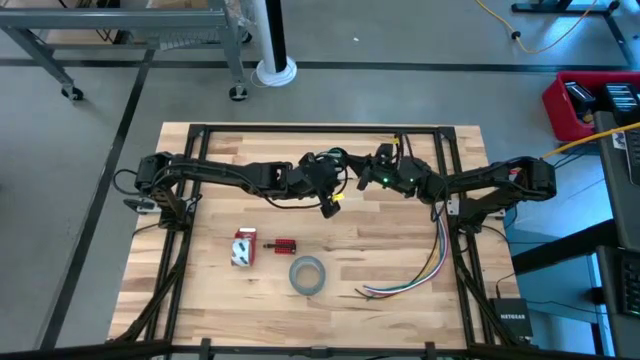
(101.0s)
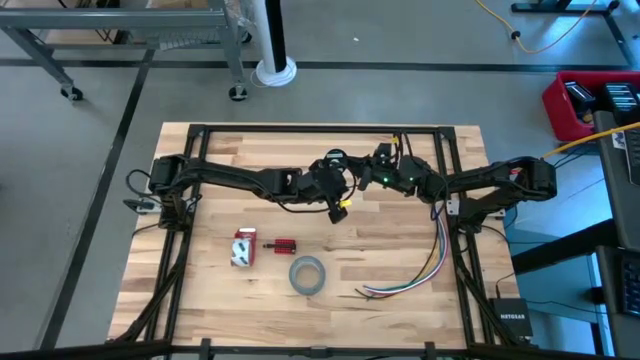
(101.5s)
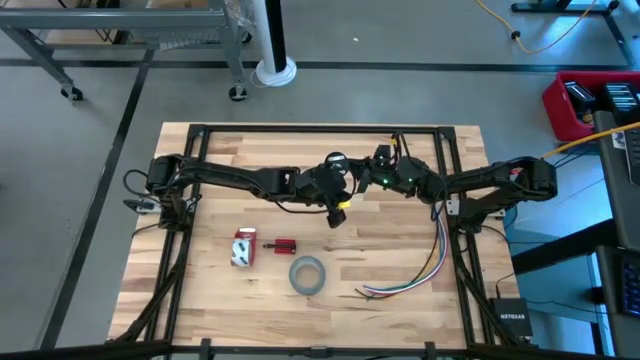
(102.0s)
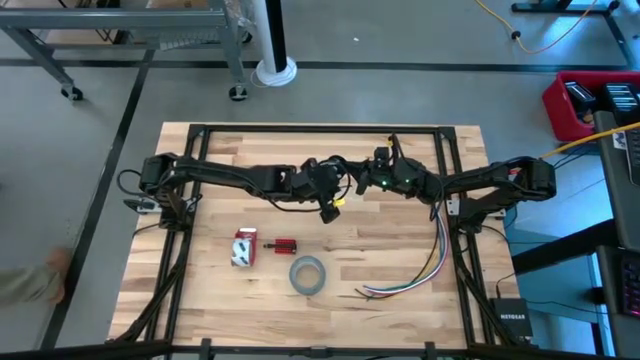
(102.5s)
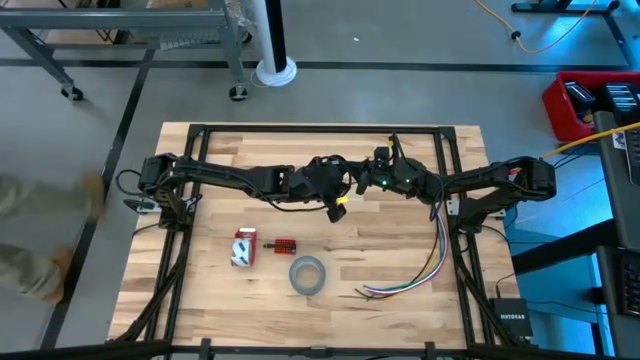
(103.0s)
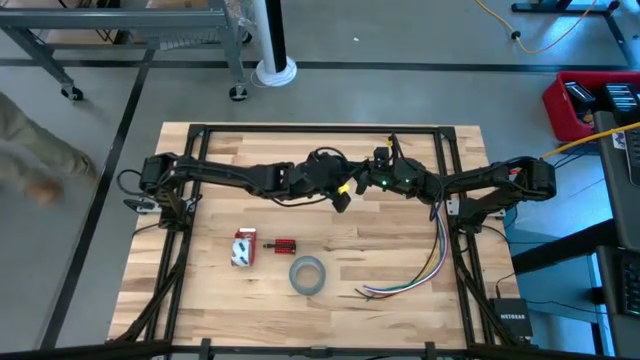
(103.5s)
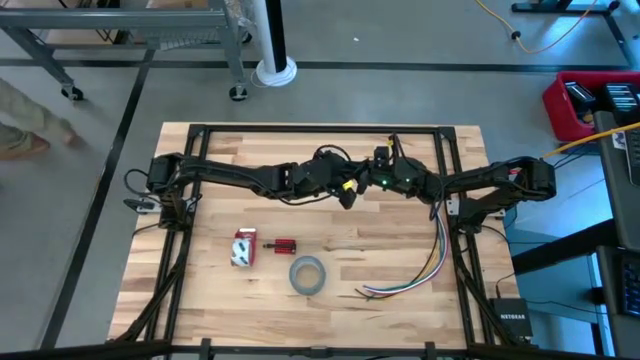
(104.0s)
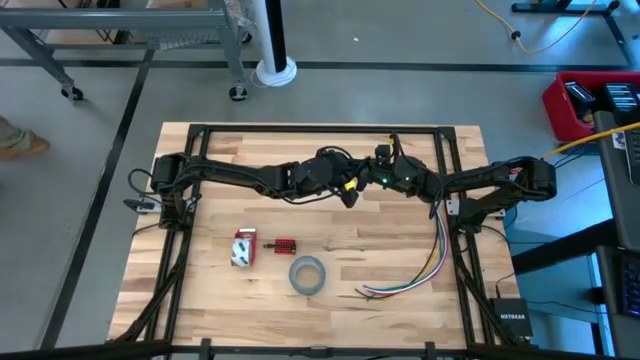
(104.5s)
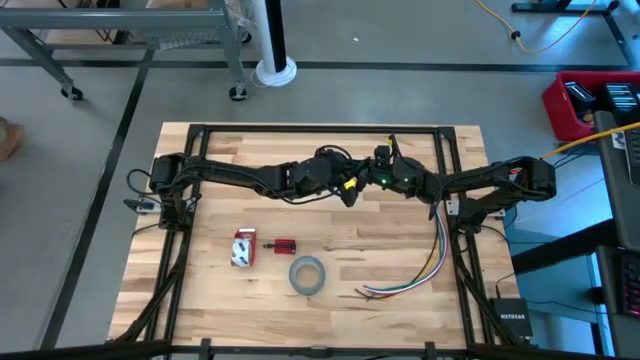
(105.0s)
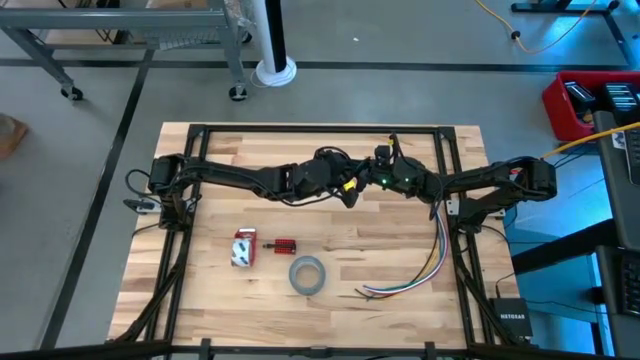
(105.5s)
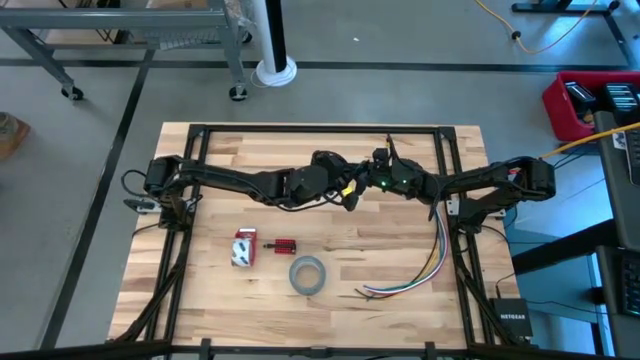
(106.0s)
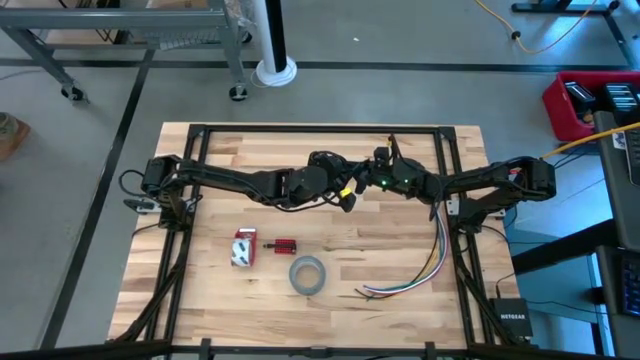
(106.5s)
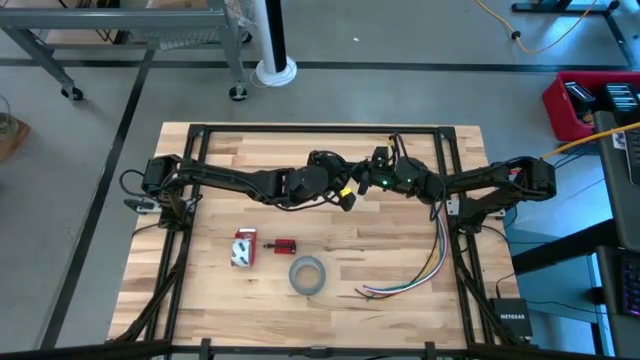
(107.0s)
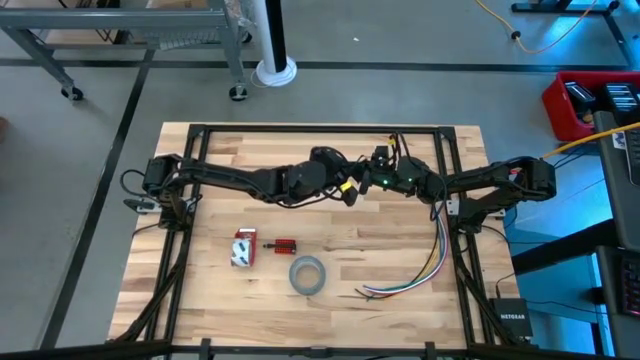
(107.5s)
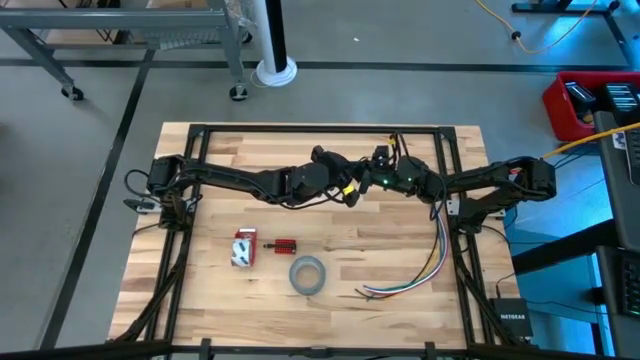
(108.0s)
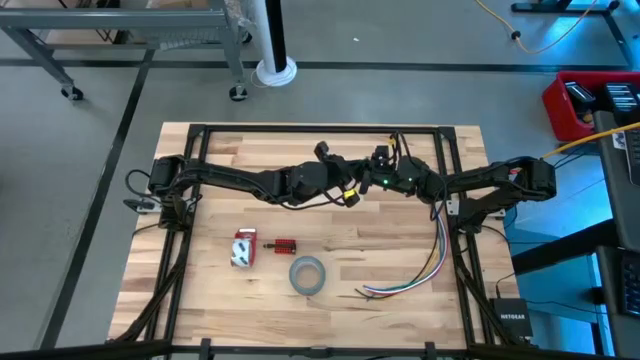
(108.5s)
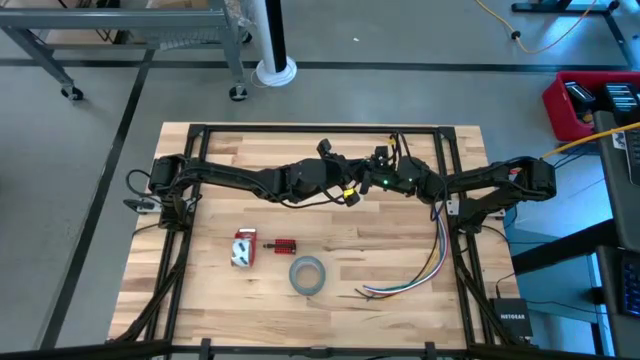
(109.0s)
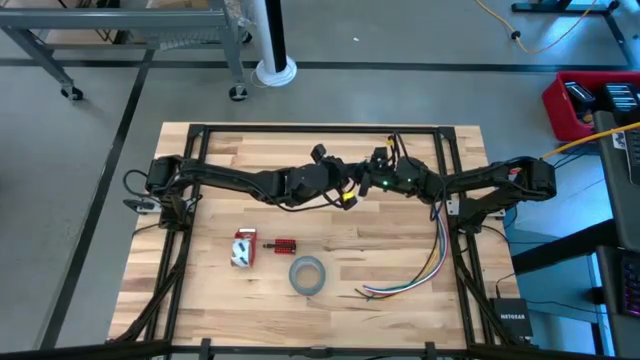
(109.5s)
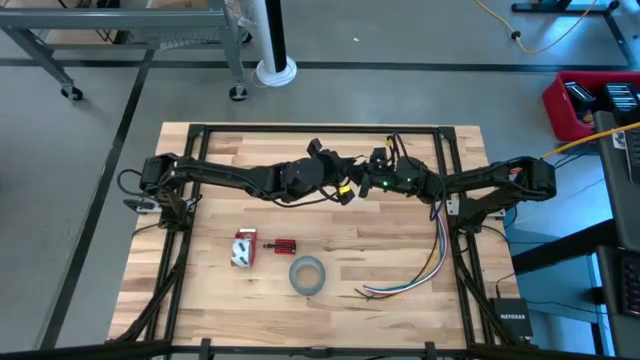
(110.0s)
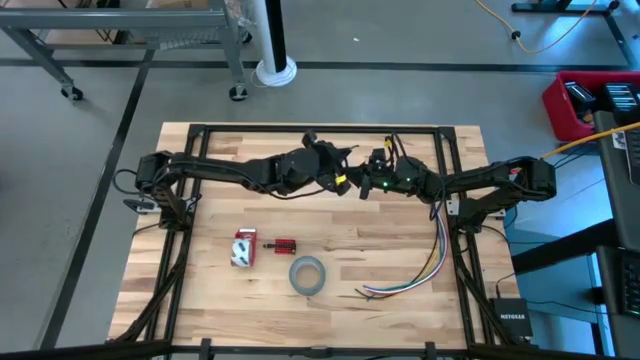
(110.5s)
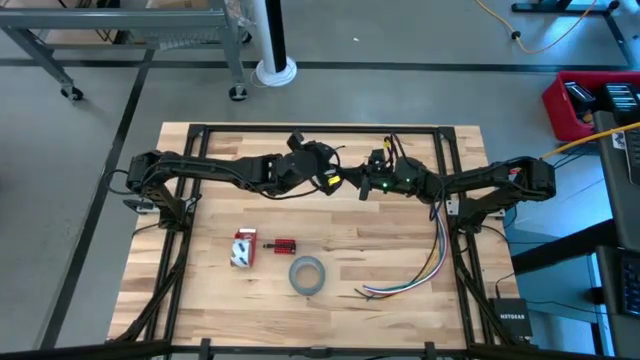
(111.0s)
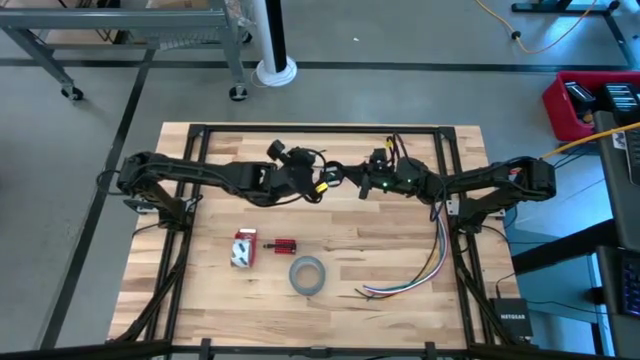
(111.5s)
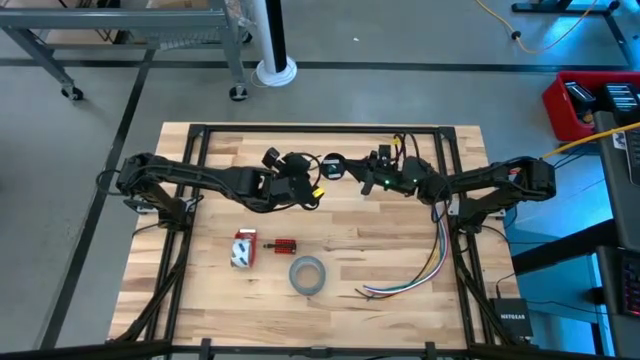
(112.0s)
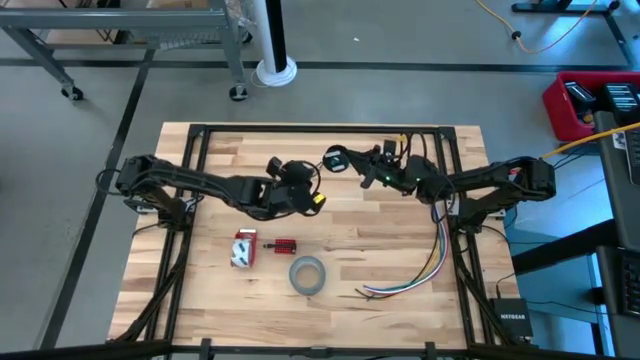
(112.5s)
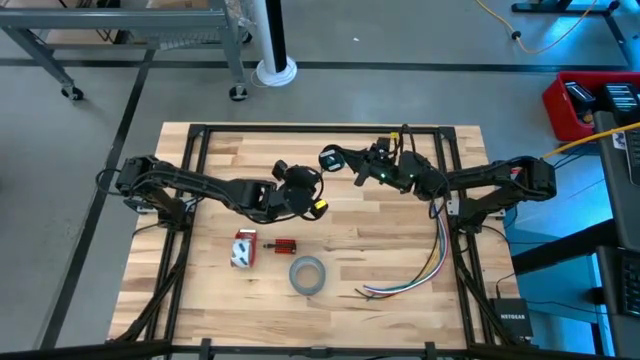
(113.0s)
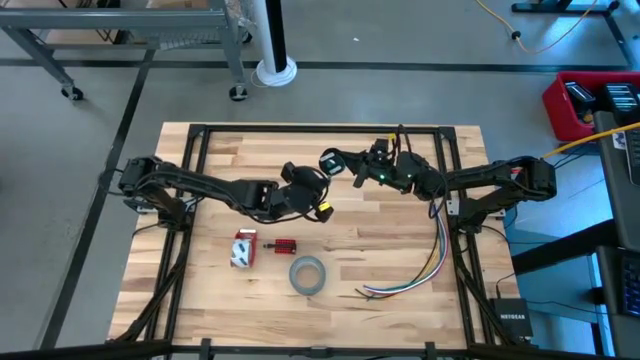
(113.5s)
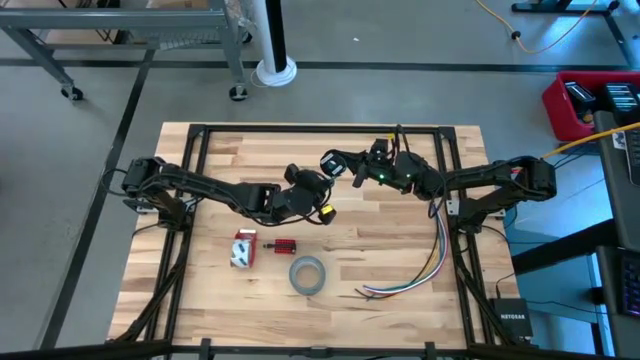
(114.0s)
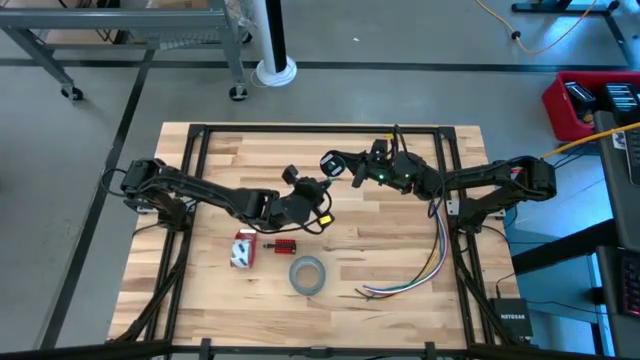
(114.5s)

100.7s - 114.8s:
Task: Coil cords
Coil the green wire onto the spool

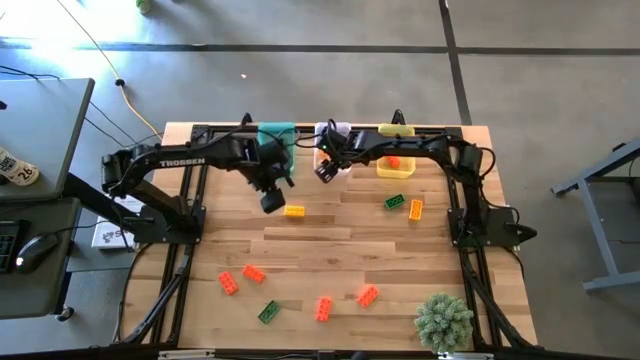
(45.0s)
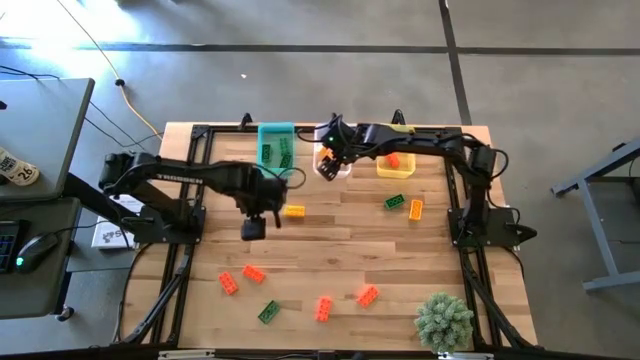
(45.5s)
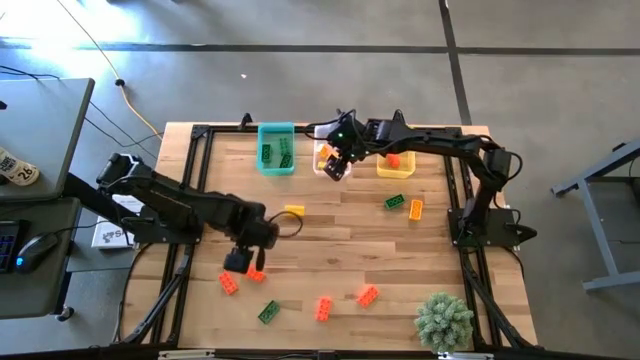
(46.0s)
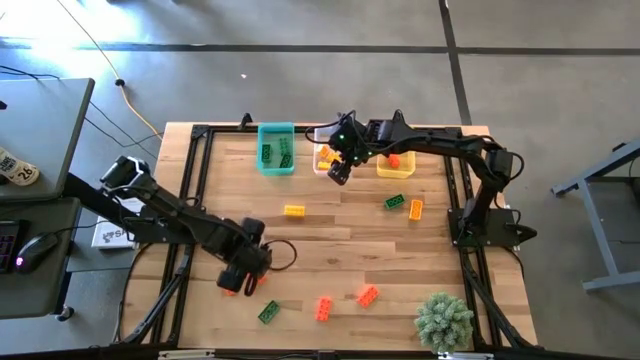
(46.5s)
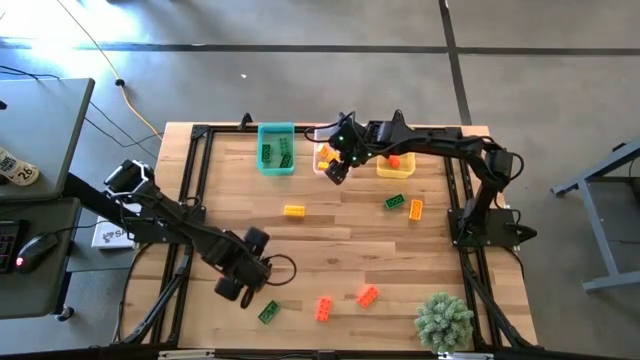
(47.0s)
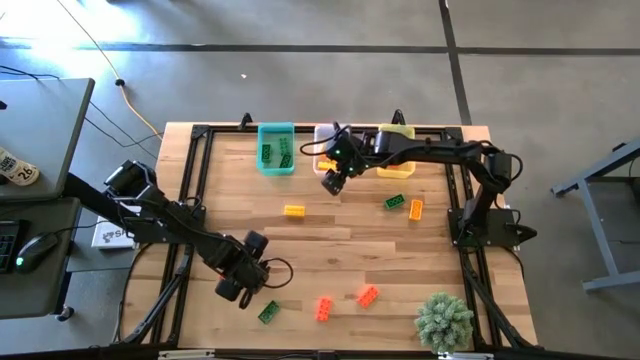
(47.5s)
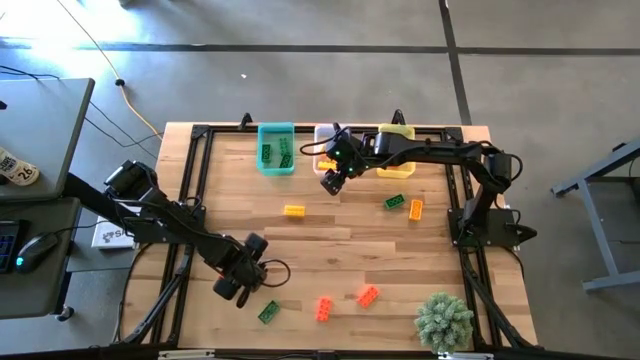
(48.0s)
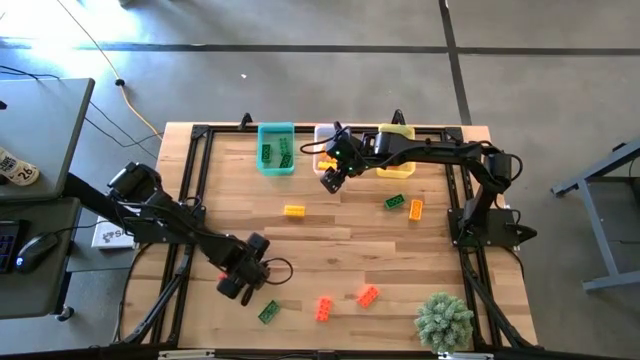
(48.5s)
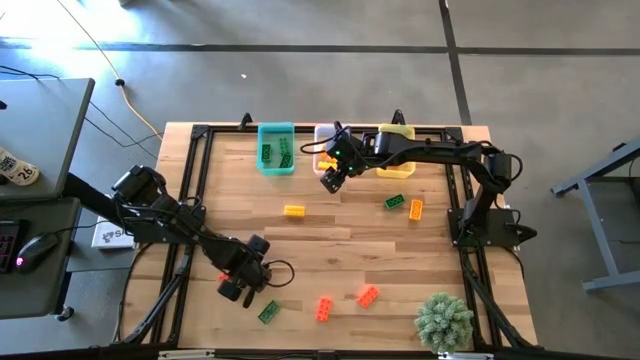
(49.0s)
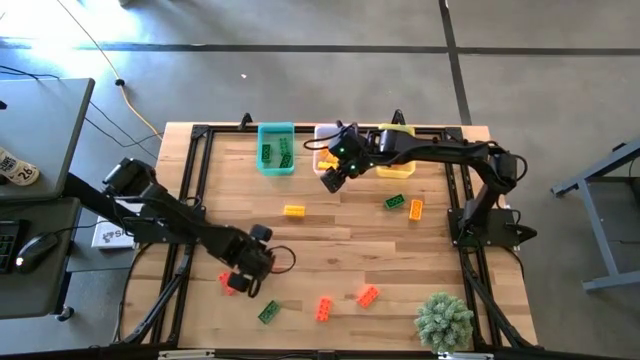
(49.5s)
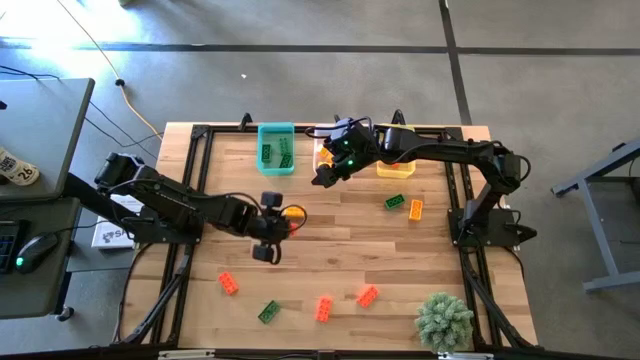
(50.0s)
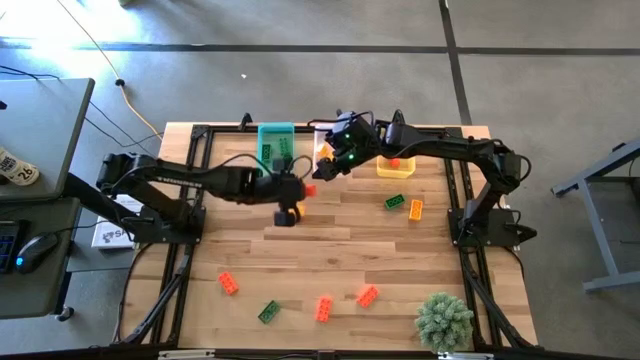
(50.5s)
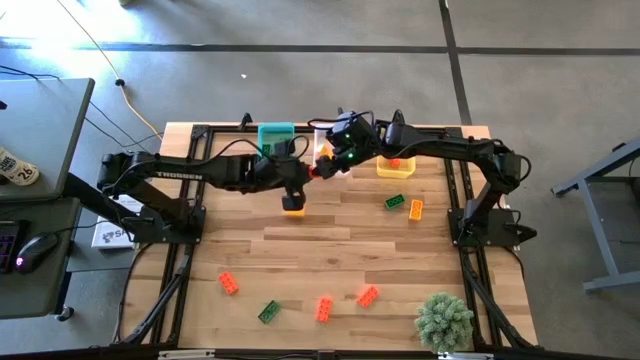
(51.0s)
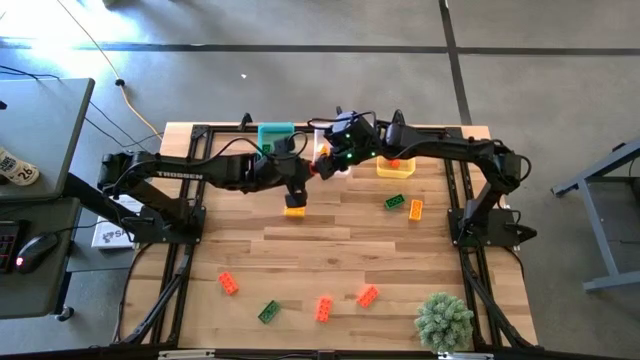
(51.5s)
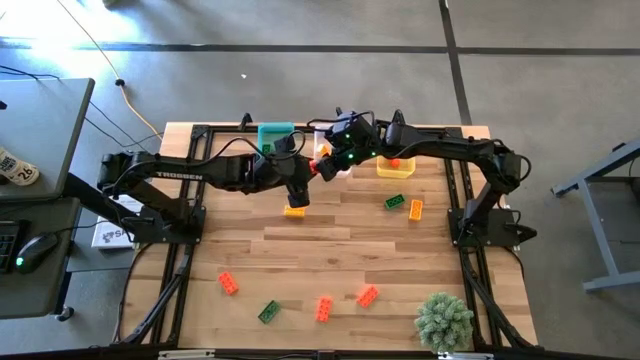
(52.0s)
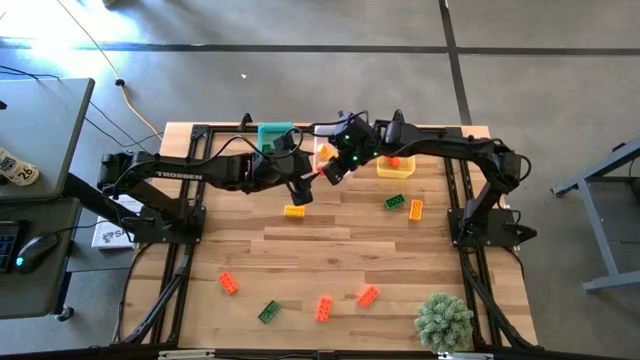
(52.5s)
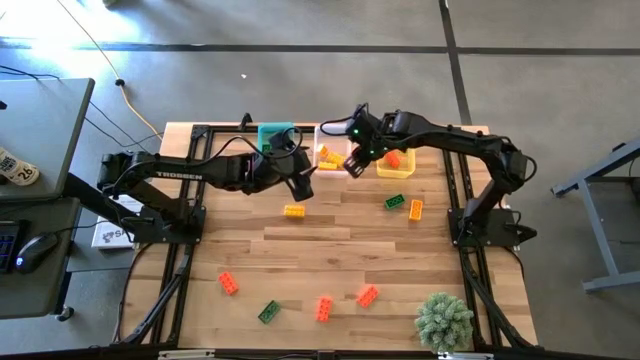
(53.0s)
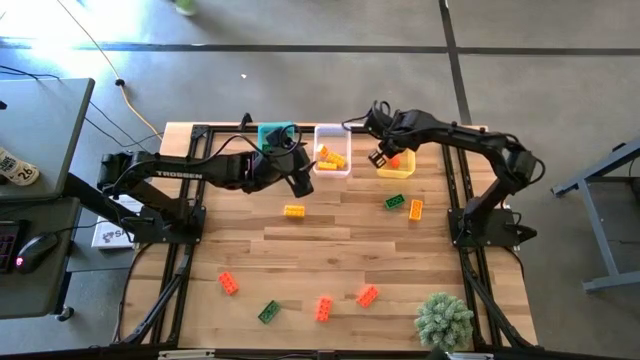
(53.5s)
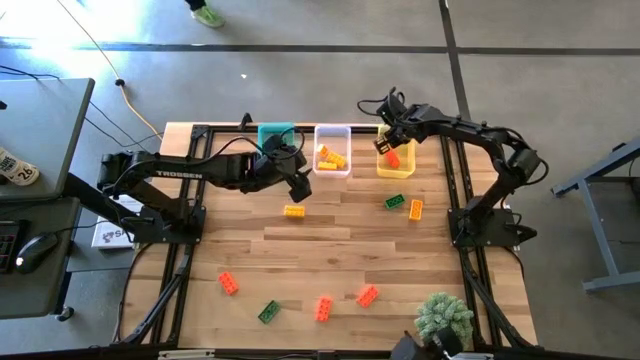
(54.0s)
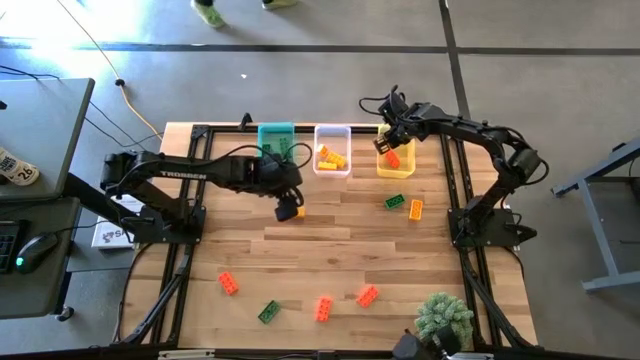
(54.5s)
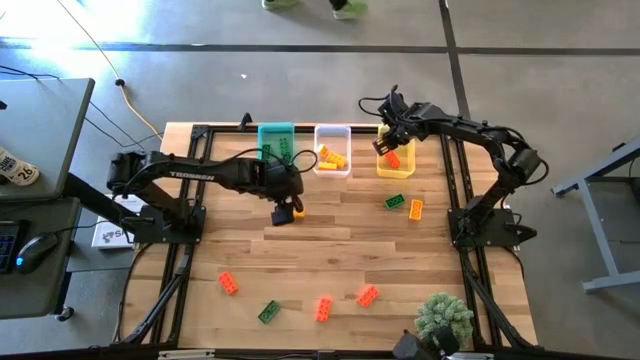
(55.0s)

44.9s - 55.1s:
Task: Sort & place blocks by color
Put the orange game piece into the yellow bin
